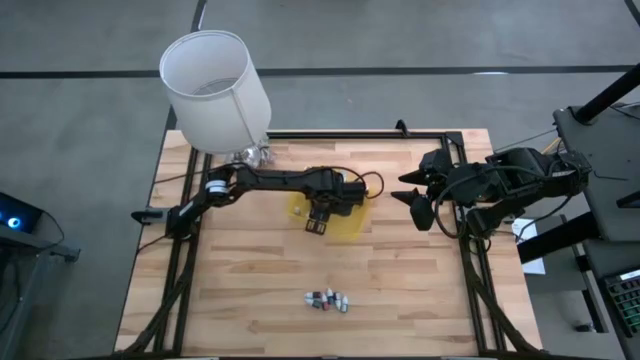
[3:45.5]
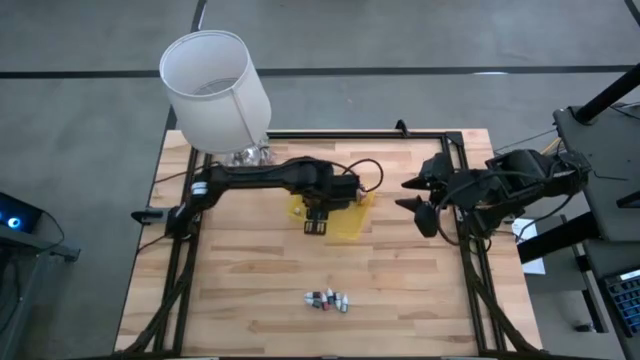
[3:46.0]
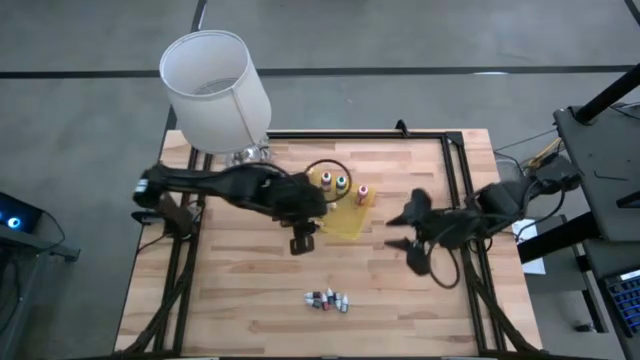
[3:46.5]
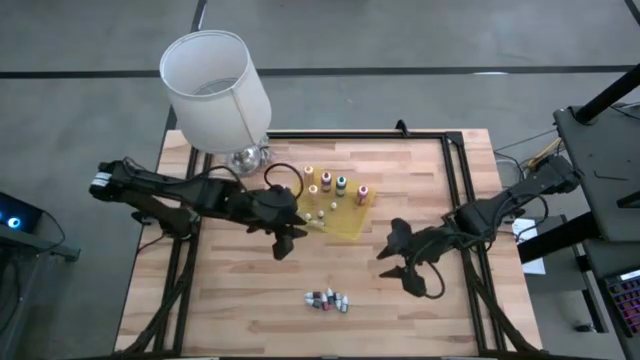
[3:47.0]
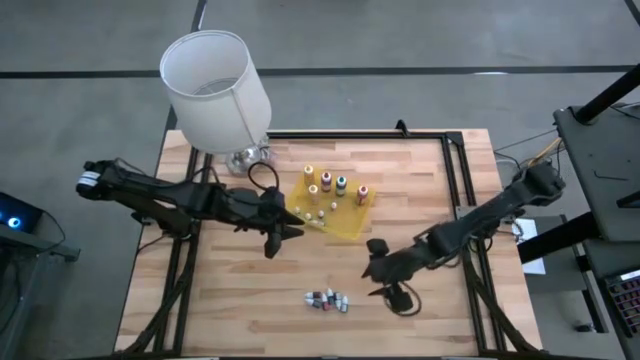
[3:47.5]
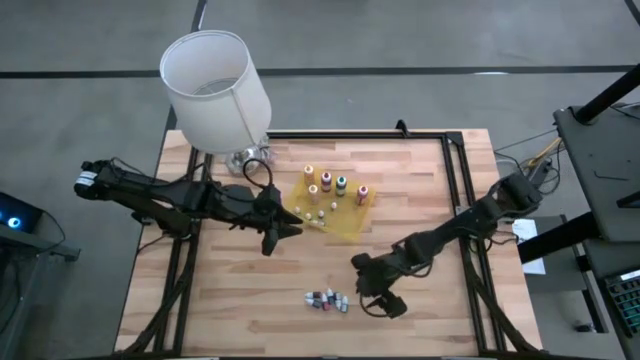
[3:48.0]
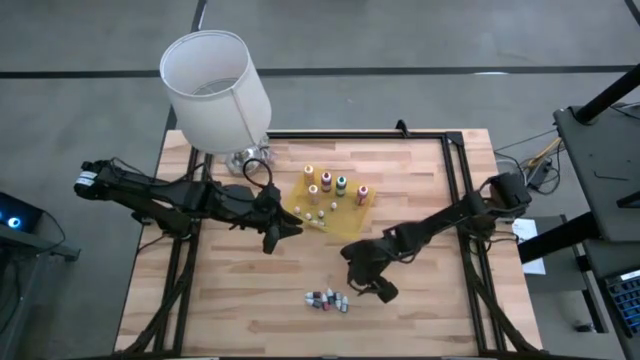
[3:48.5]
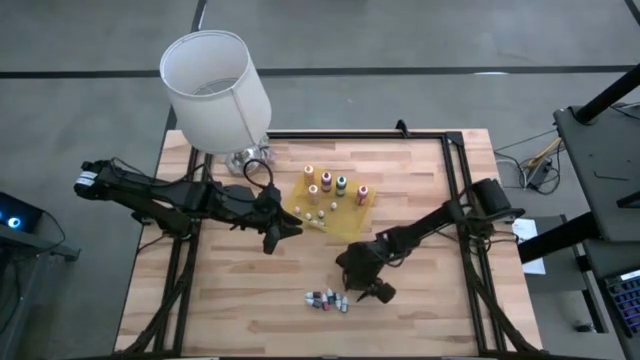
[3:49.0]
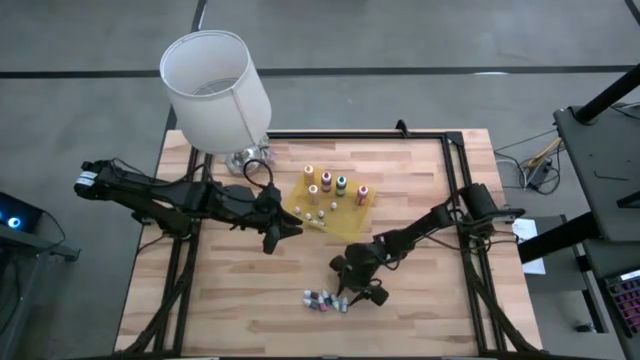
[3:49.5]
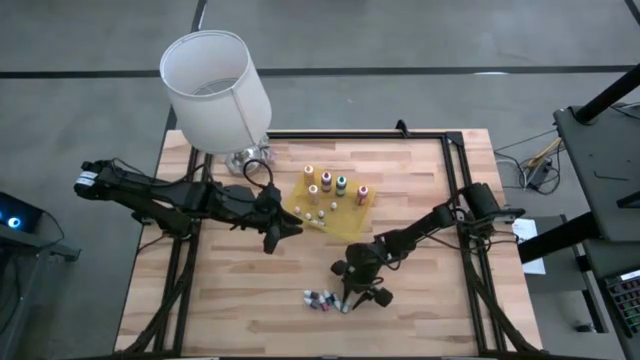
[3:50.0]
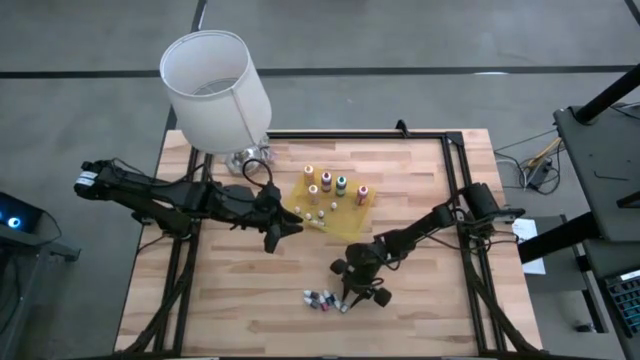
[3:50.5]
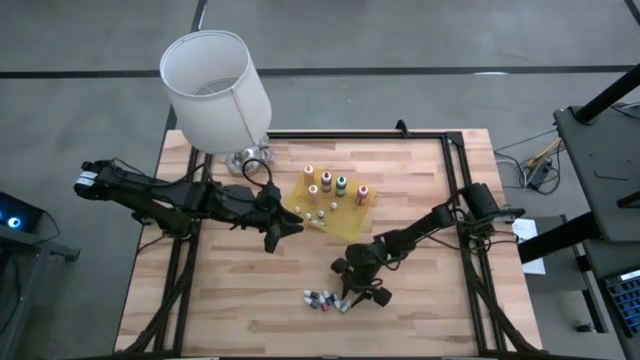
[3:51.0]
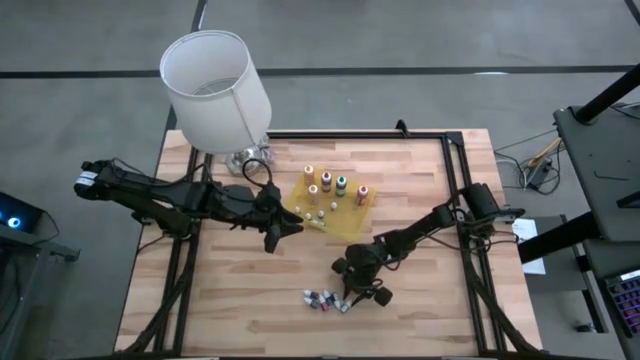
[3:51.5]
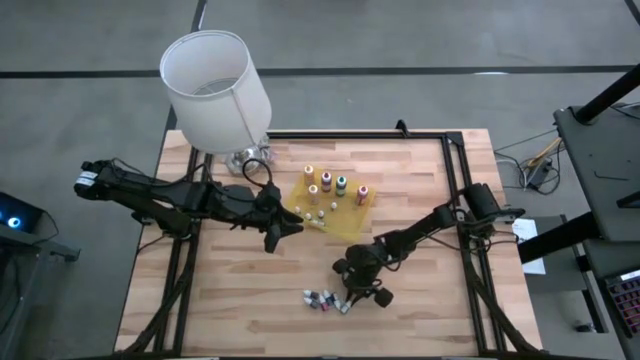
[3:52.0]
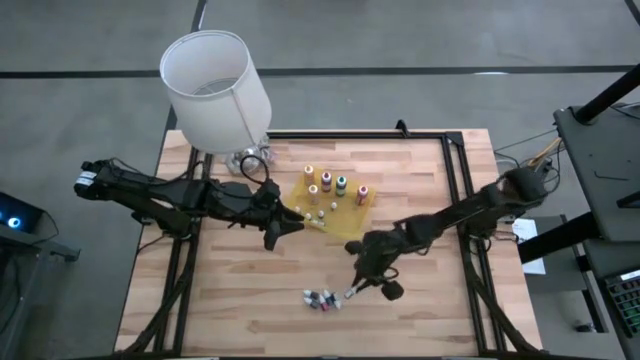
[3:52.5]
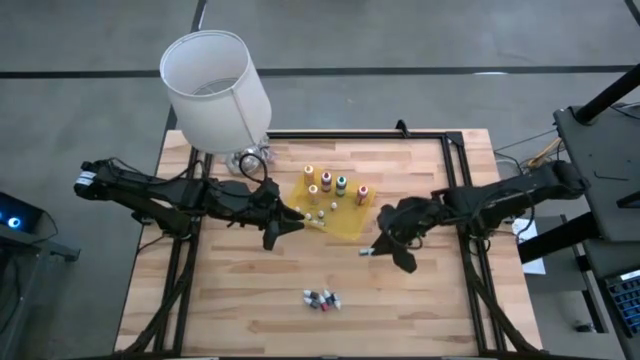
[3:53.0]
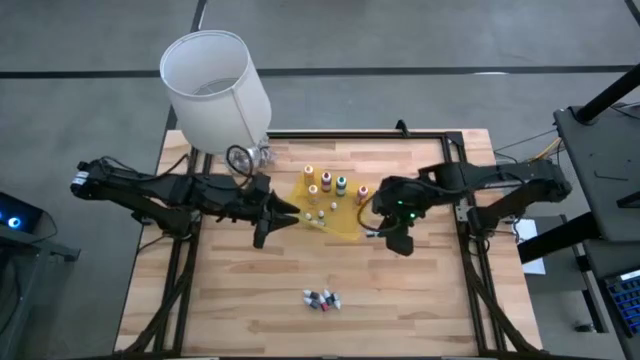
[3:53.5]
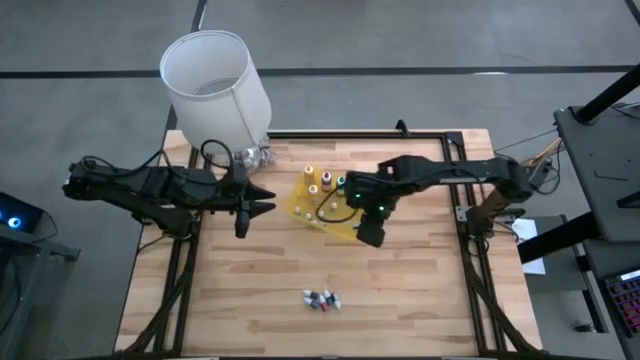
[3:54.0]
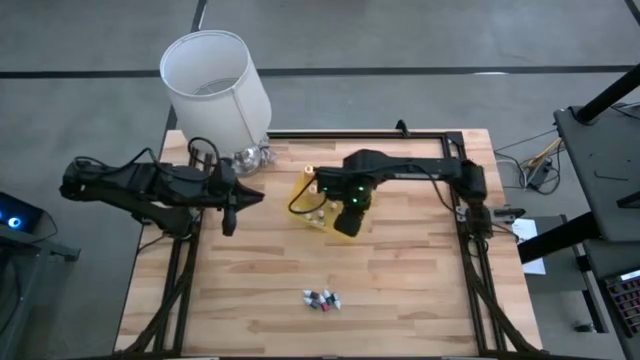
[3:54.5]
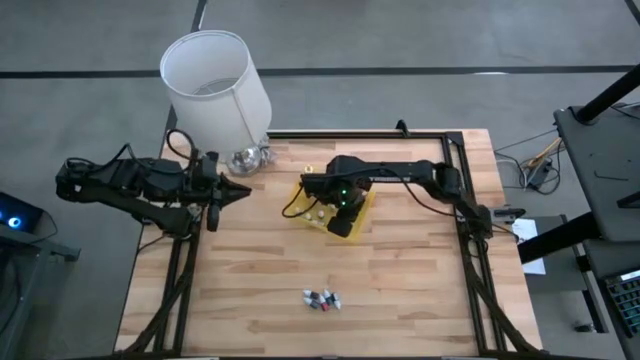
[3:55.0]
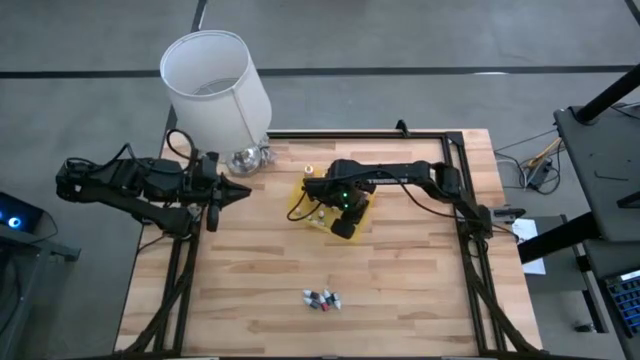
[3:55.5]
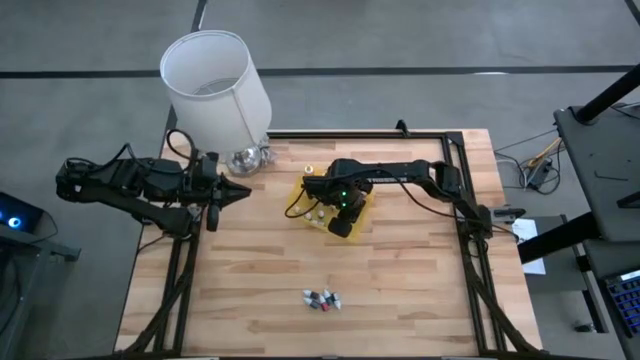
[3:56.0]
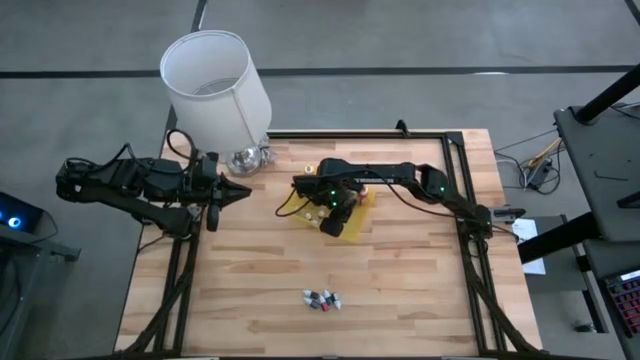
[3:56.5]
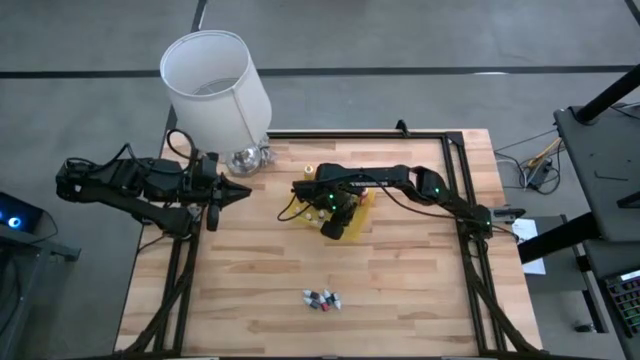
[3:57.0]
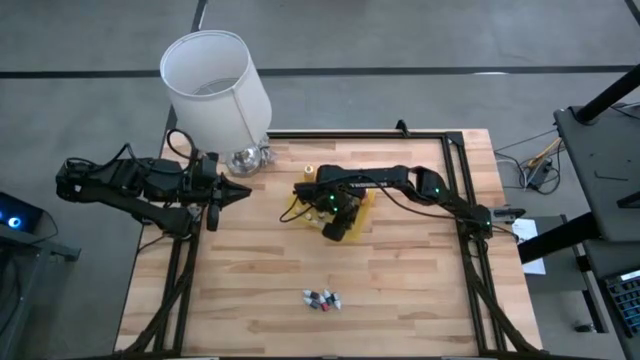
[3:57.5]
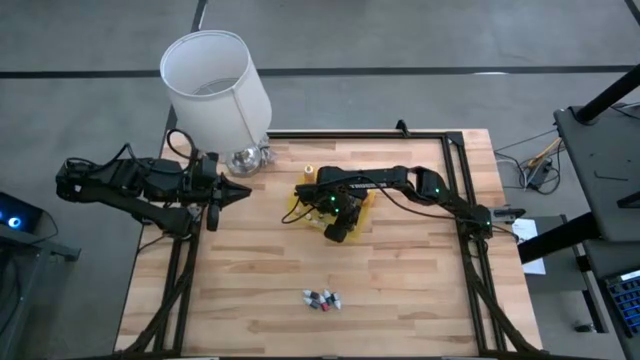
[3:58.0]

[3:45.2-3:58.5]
Task: Pick & Place food coloring
Put the small purple food coloring bottle into the yellow bin

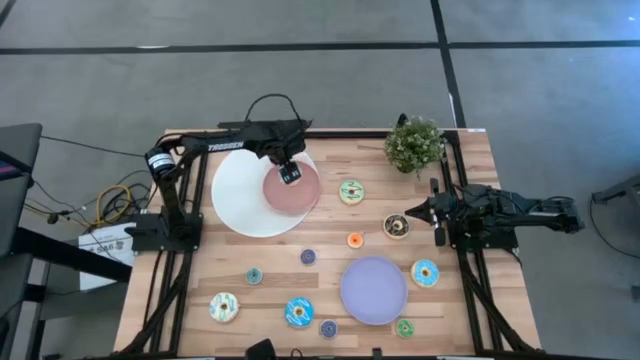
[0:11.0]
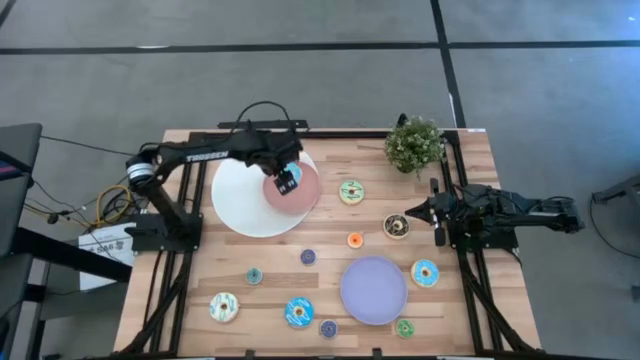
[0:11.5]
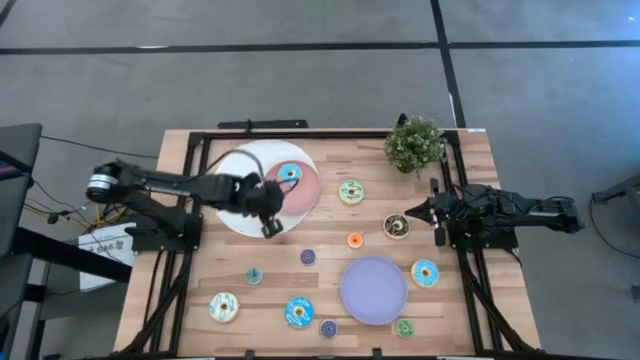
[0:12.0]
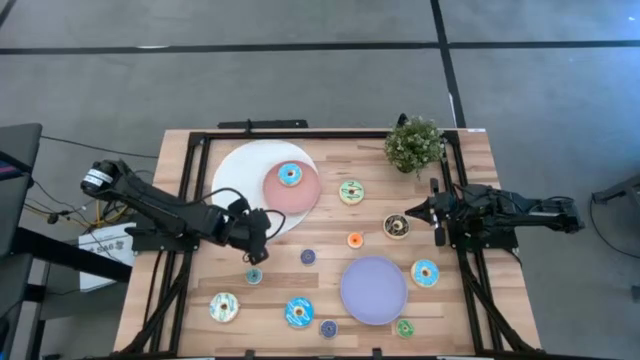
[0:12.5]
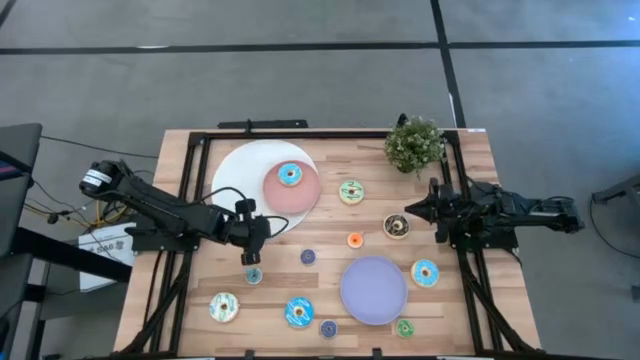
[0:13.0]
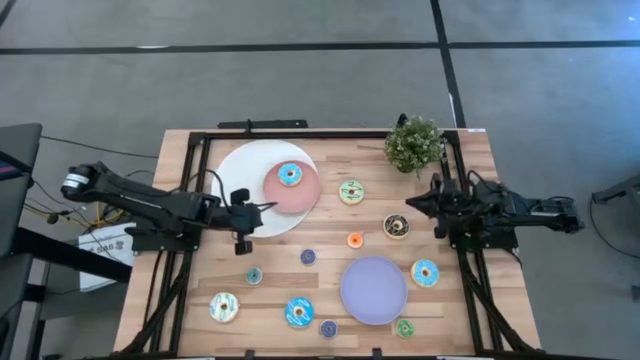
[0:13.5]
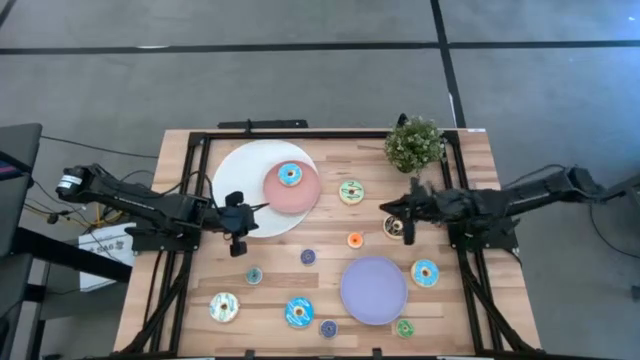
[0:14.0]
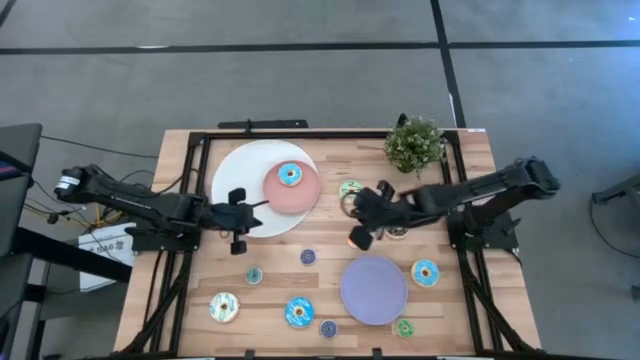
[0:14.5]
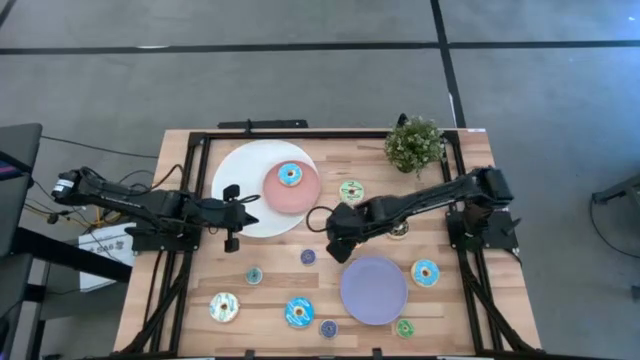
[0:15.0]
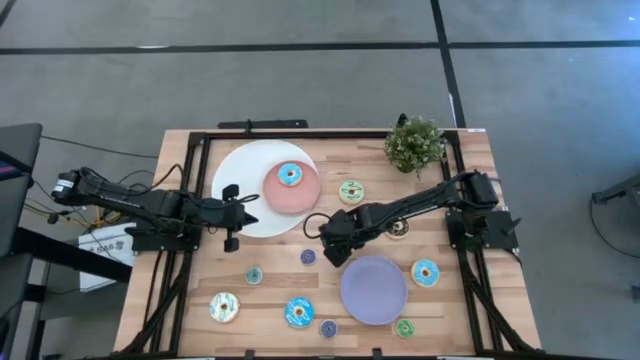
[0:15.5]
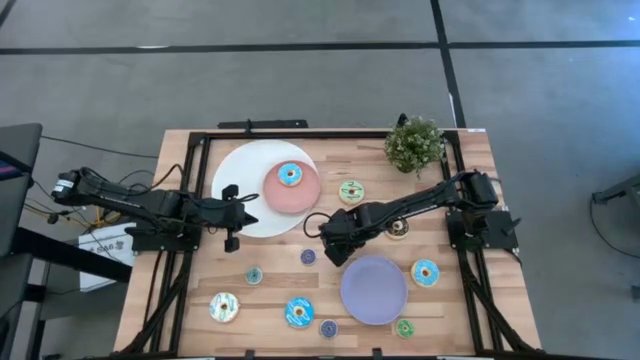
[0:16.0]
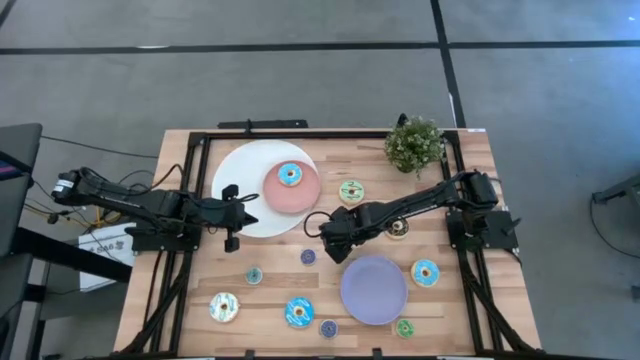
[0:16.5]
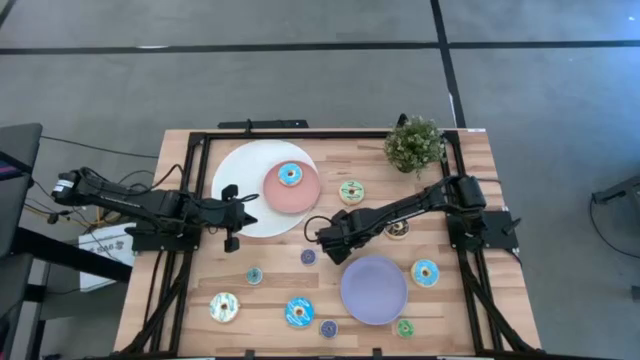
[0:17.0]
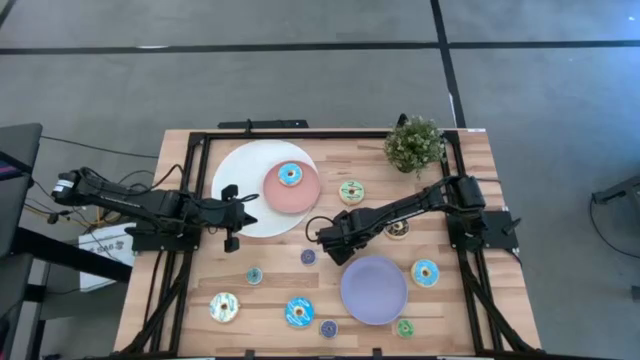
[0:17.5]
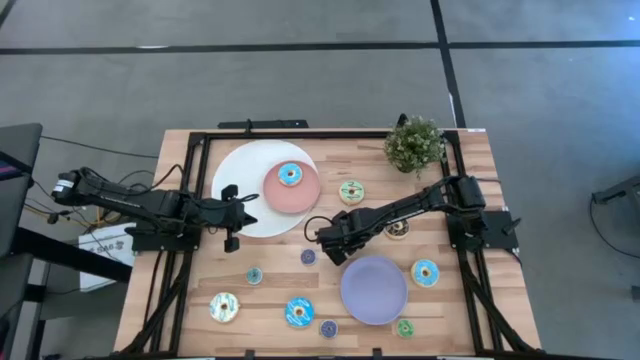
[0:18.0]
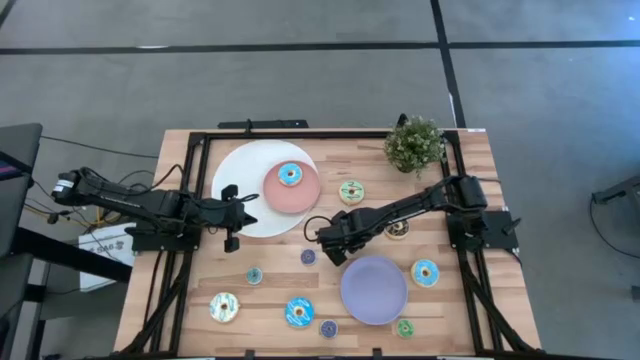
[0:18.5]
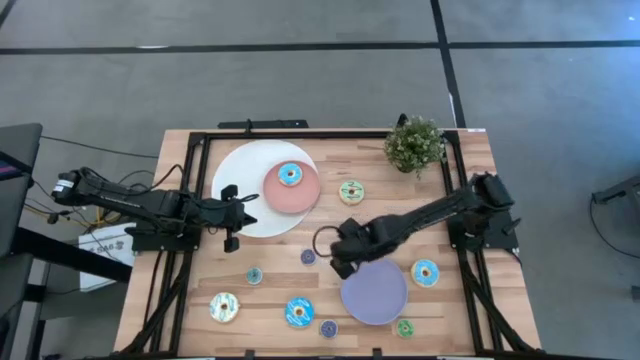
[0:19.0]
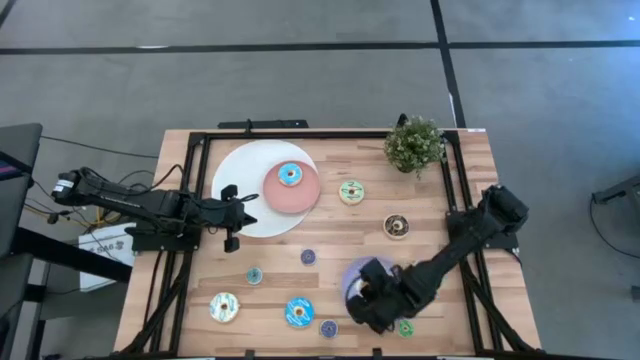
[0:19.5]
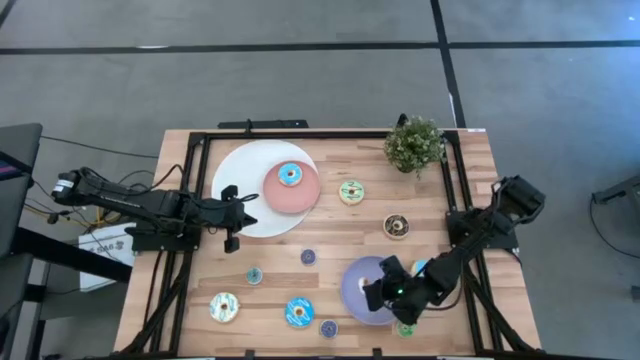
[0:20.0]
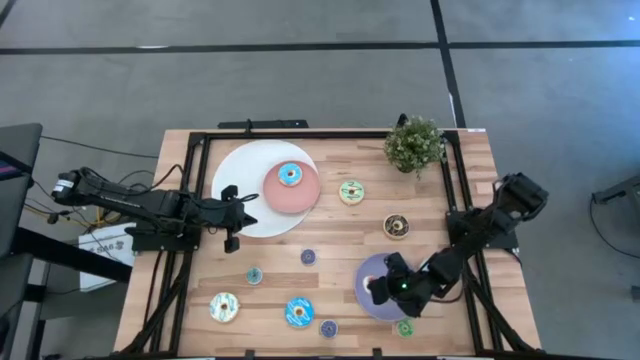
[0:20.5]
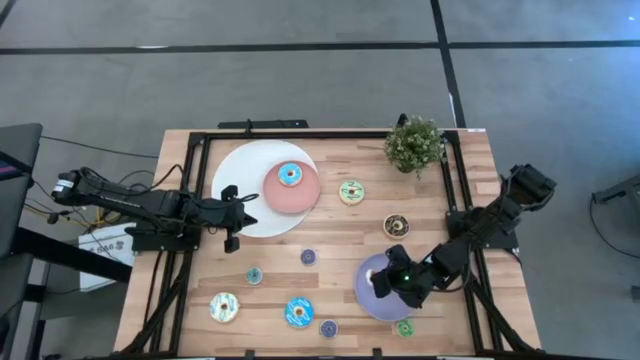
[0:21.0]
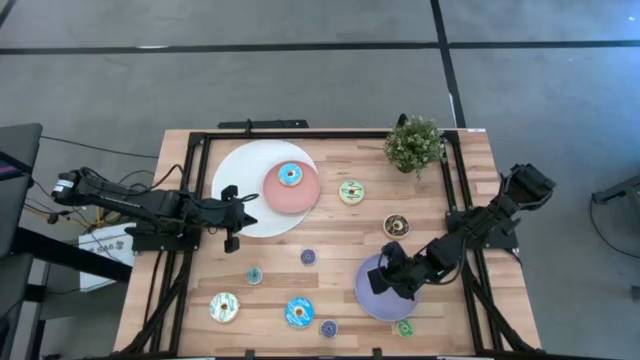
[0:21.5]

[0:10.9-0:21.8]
Task: Pick & Place donuts
Put the small orange donut on the purple plate
